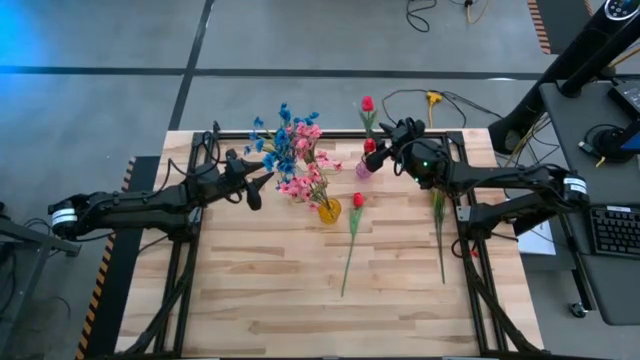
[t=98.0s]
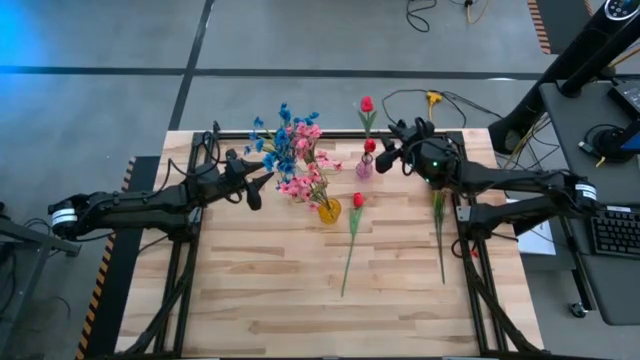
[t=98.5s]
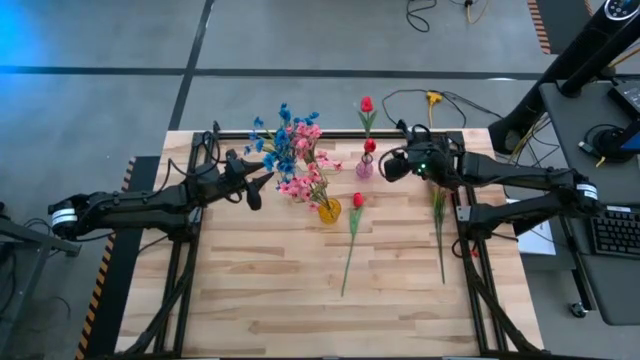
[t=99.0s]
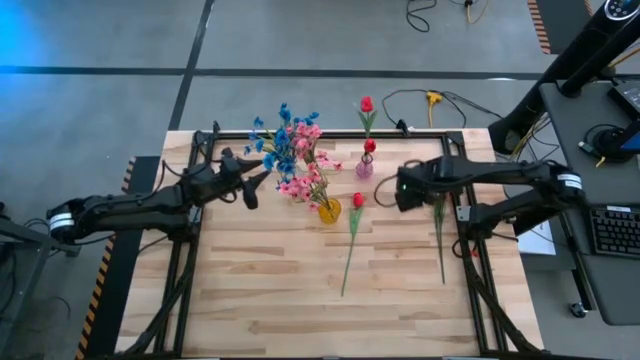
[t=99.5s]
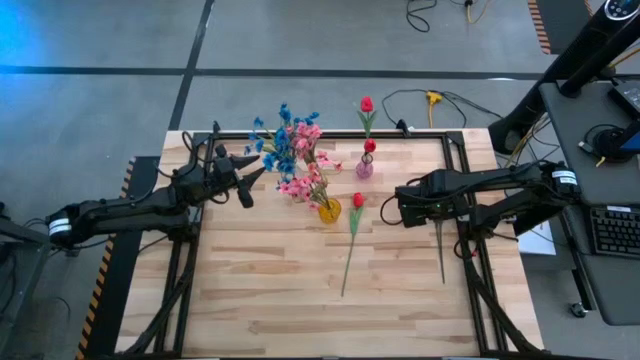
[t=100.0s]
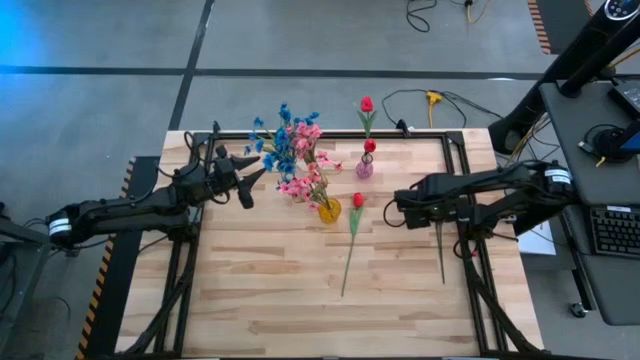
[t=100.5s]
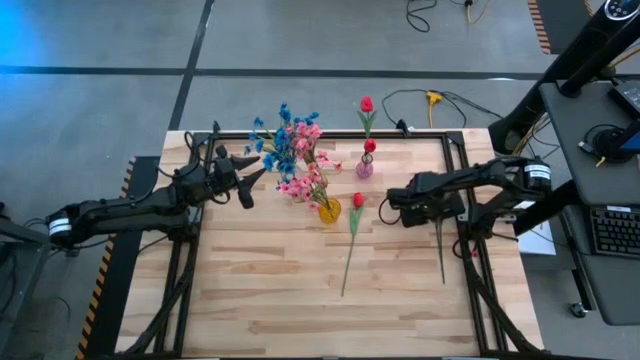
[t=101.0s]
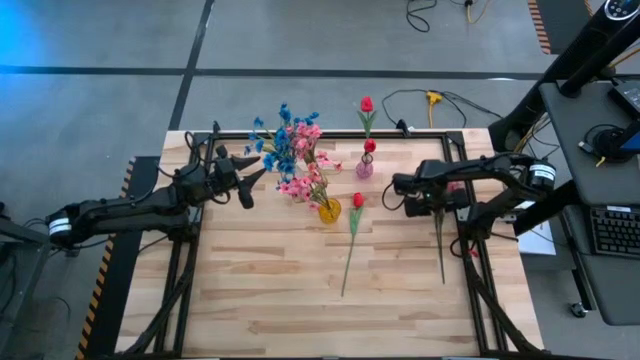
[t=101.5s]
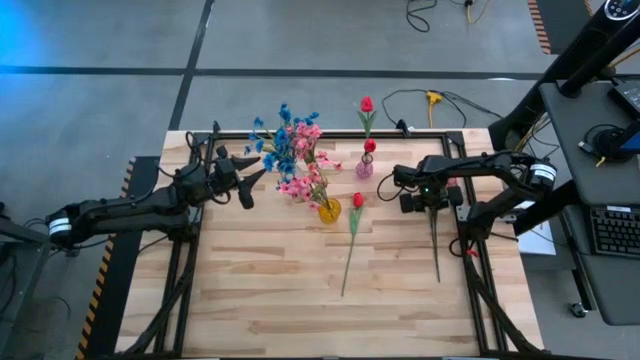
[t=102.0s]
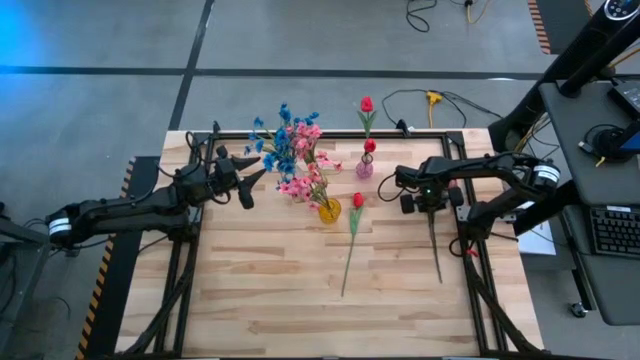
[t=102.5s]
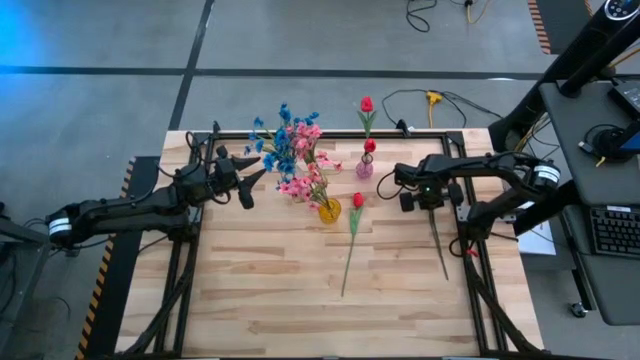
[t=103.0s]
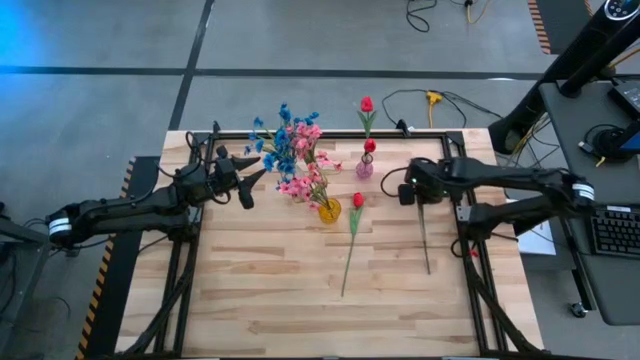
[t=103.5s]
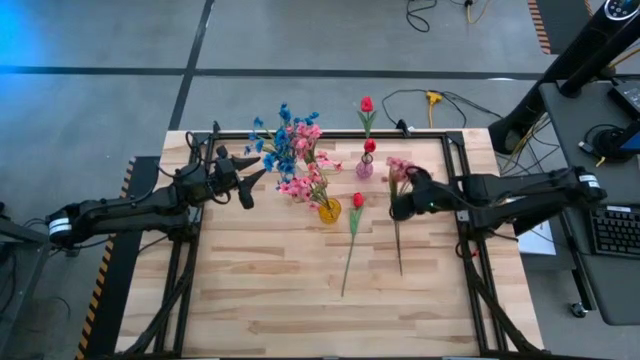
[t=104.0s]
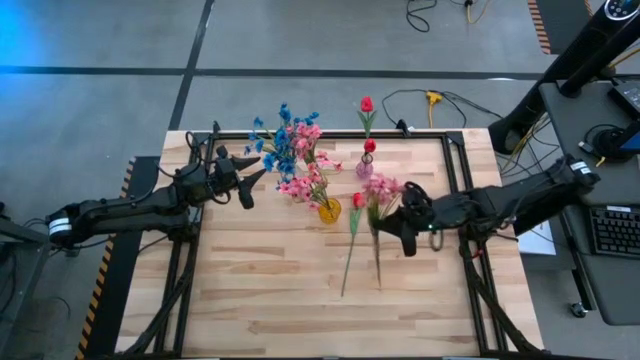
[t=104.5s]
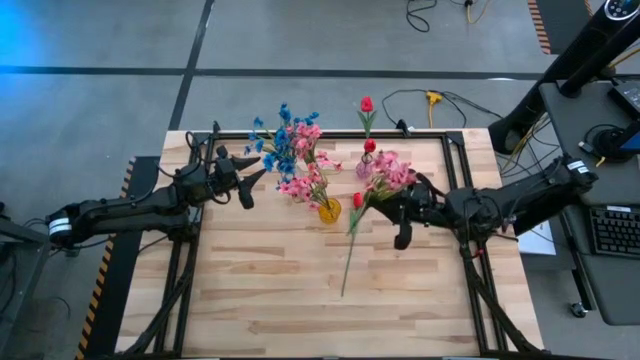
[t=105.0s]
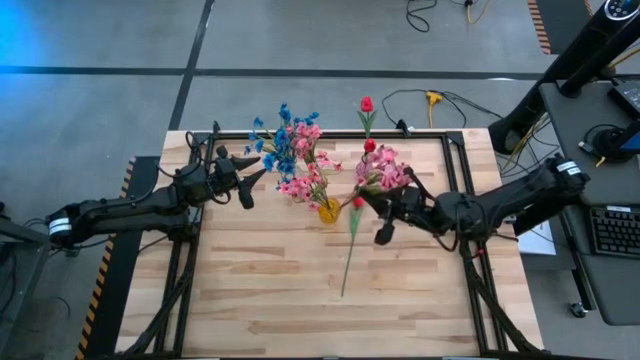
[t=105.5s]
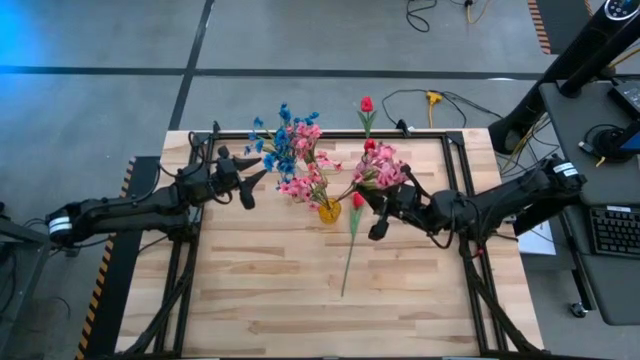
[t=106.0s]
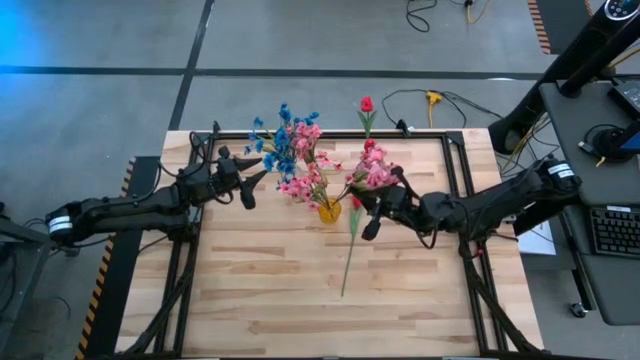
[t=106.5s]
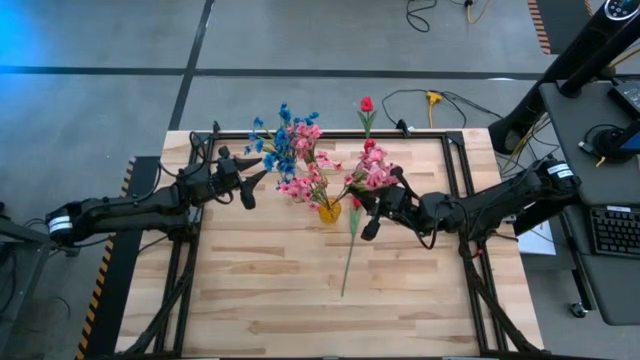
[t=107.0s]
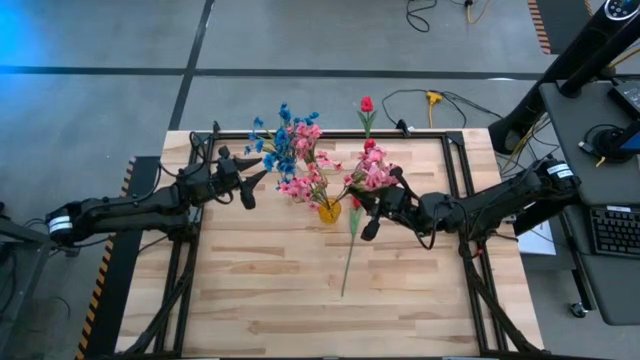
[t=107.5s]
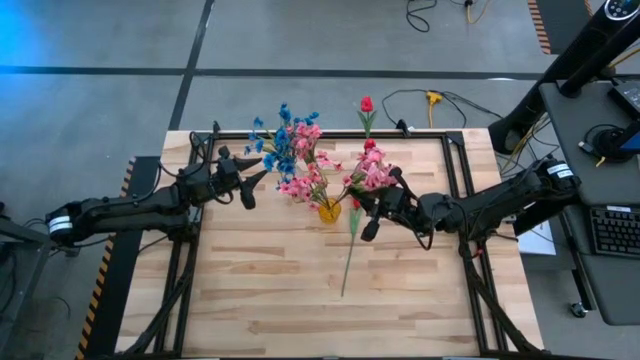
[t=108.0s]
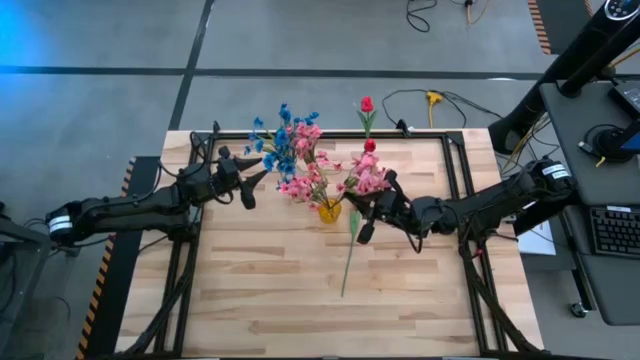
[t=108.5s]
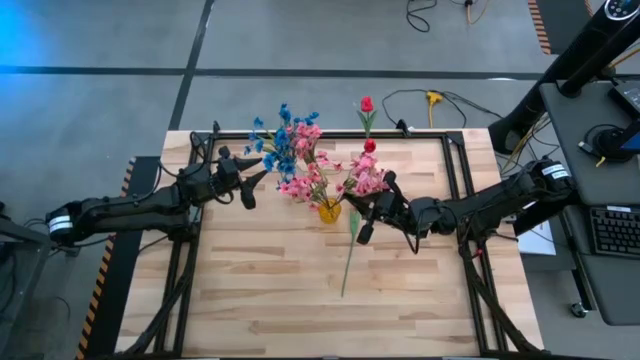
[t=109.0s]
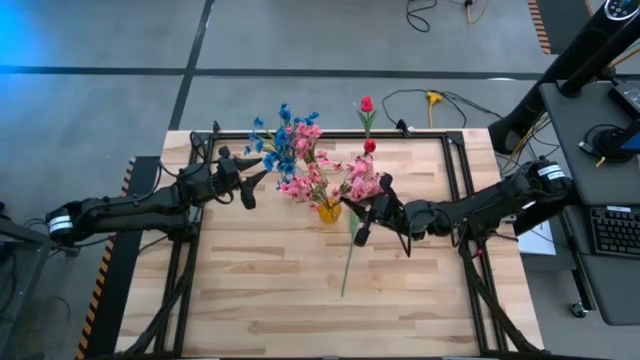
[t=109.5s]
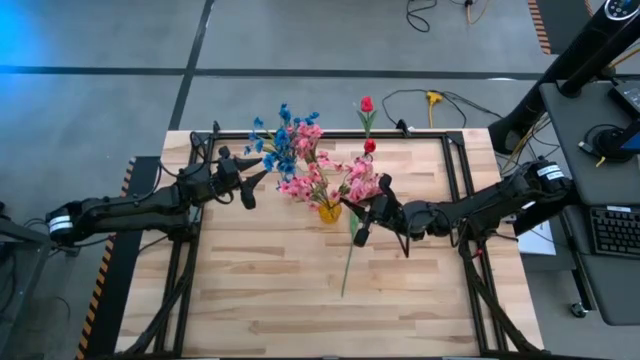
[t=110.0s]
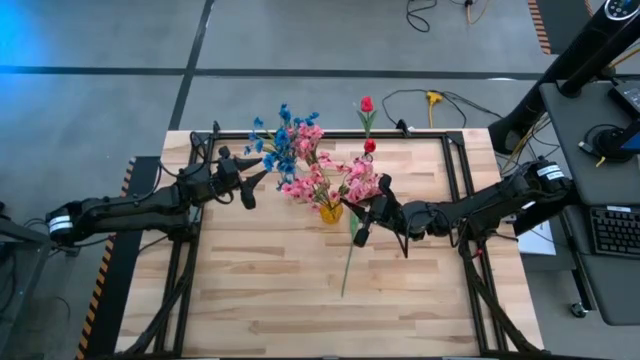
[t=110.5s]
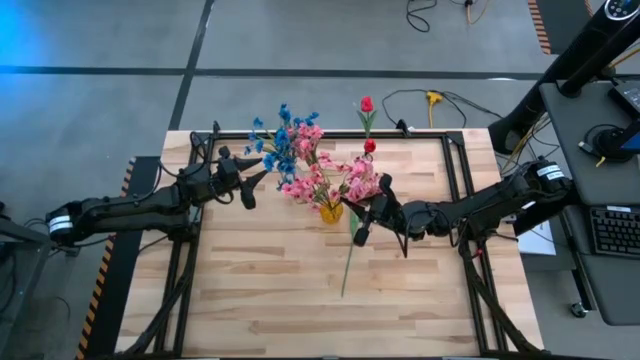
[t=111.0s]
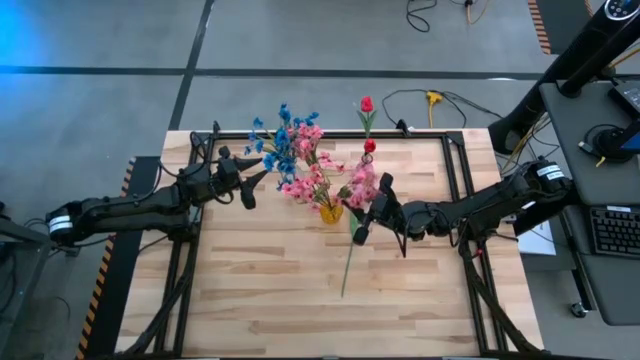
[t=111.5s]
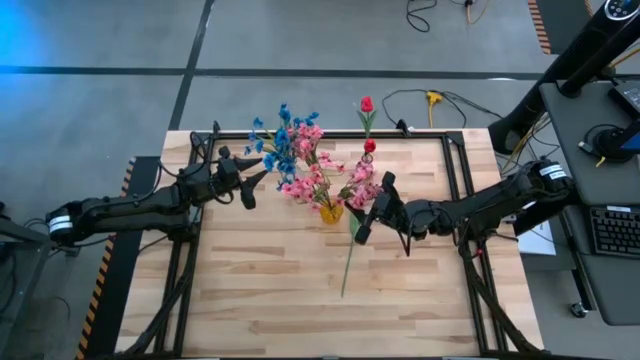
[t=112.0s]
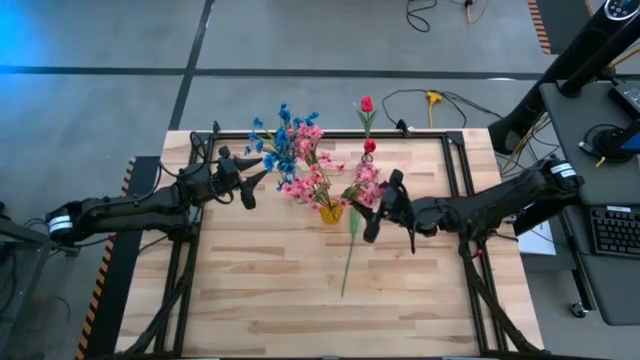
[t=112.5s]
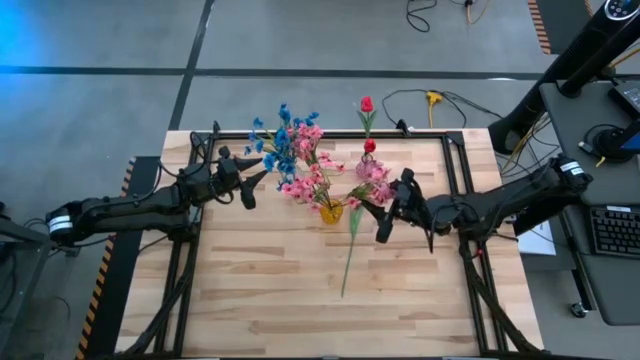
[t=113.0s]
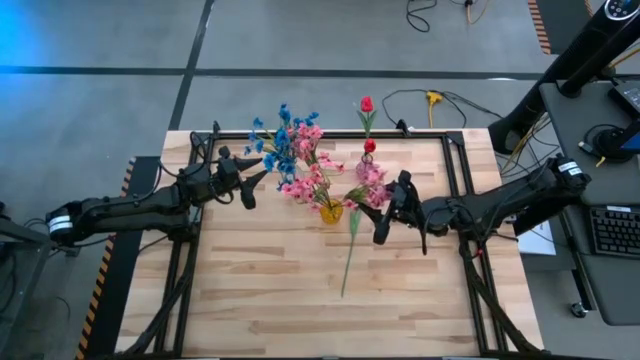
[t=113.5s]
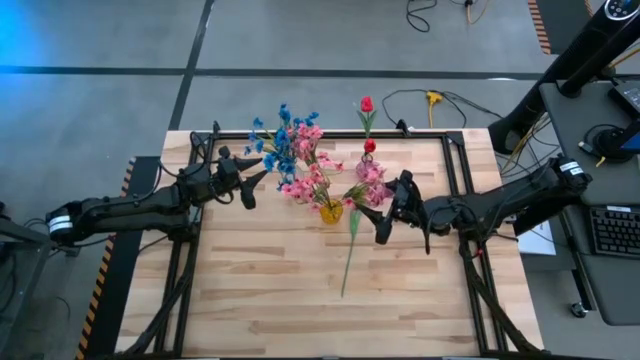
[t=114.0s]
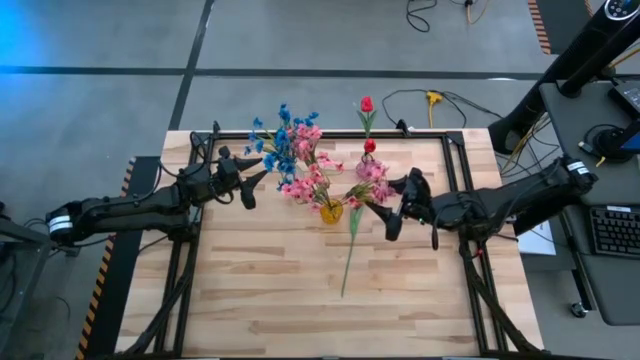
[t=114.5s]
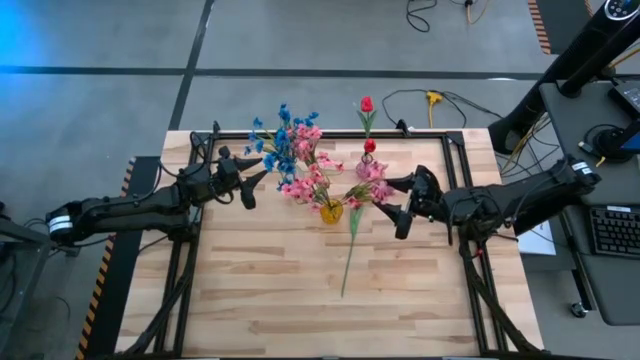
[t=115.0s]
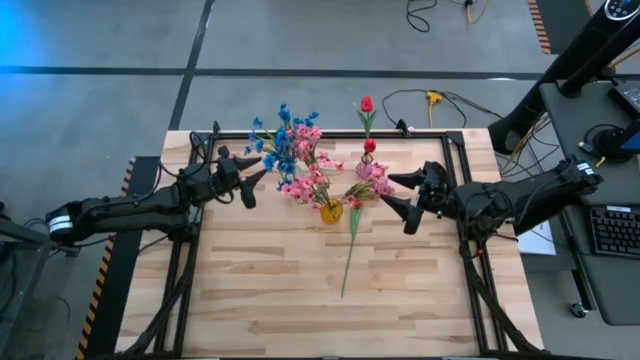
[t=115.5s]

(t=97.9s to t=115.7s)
Task: Sort flowers into vase by color
Put the pink flowers into the yellow vase

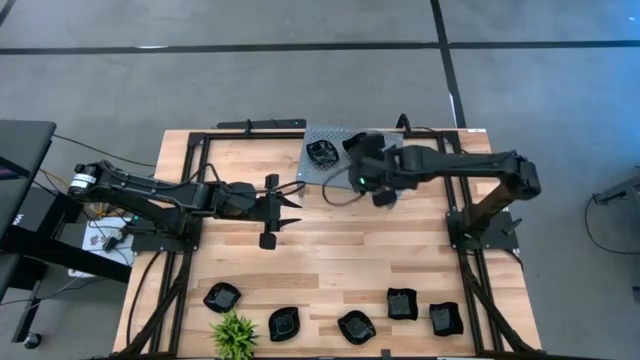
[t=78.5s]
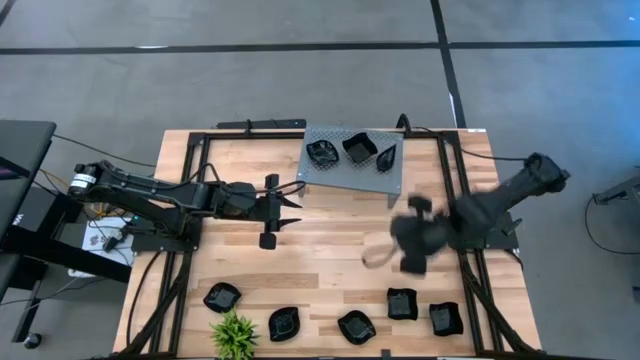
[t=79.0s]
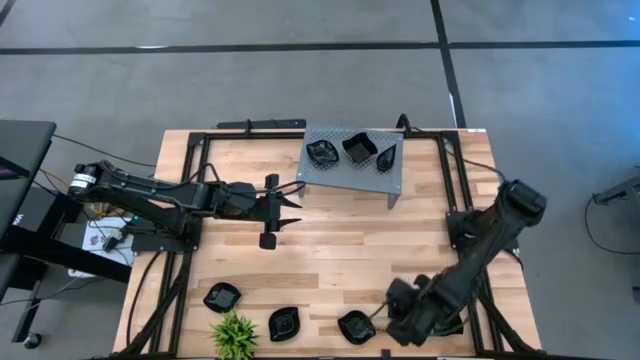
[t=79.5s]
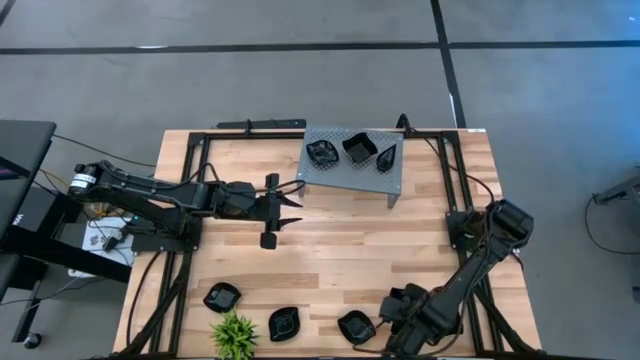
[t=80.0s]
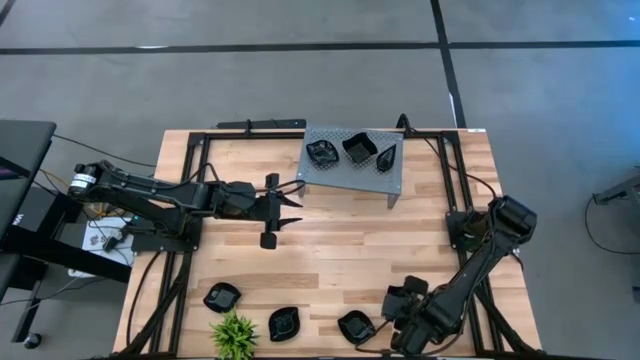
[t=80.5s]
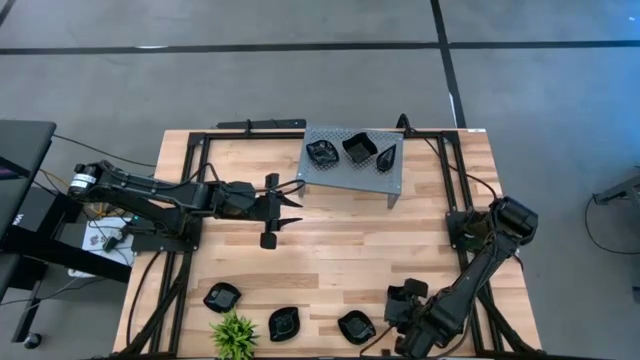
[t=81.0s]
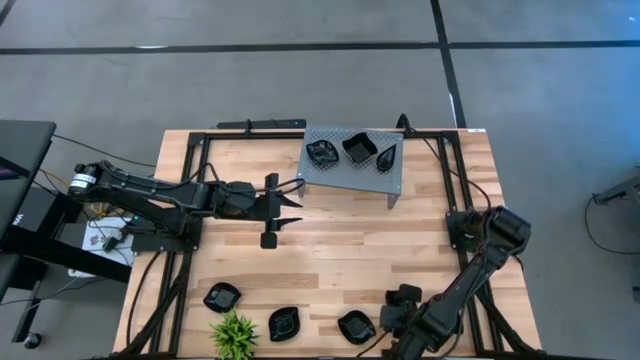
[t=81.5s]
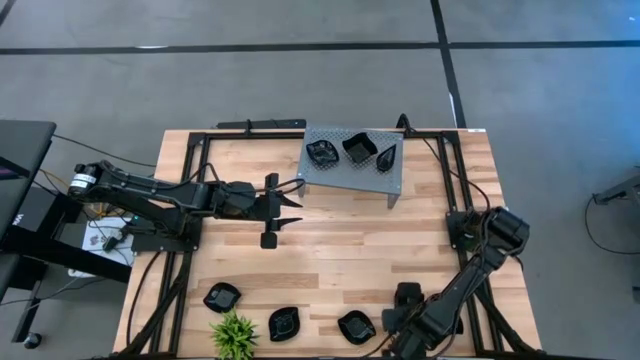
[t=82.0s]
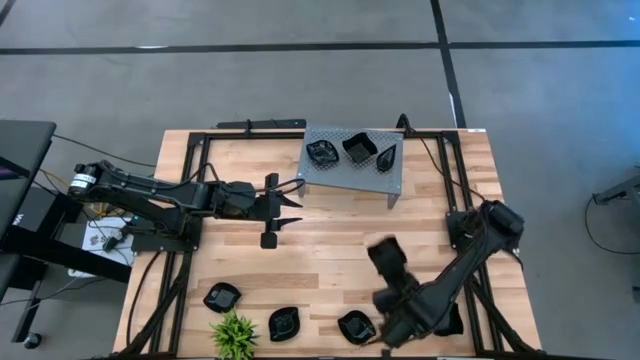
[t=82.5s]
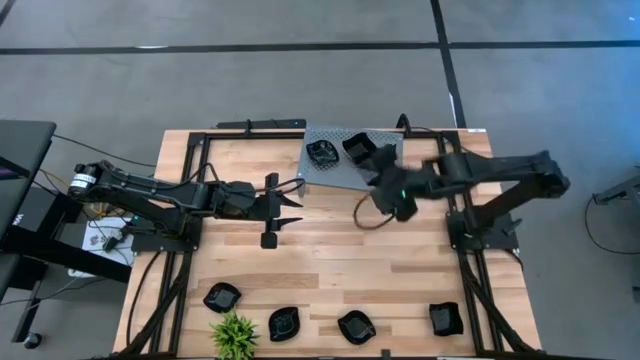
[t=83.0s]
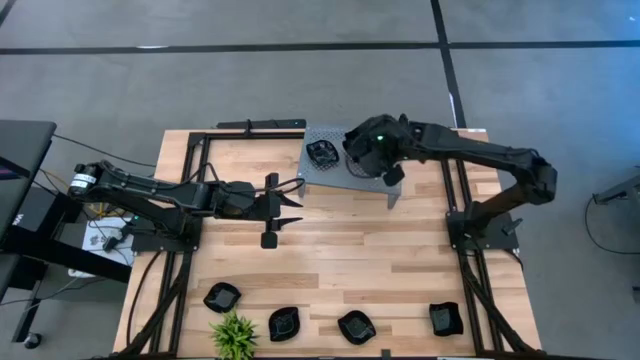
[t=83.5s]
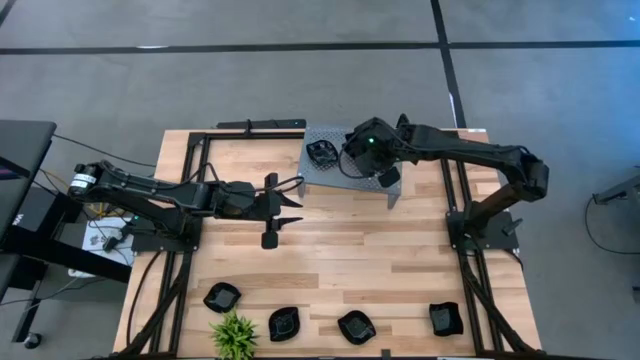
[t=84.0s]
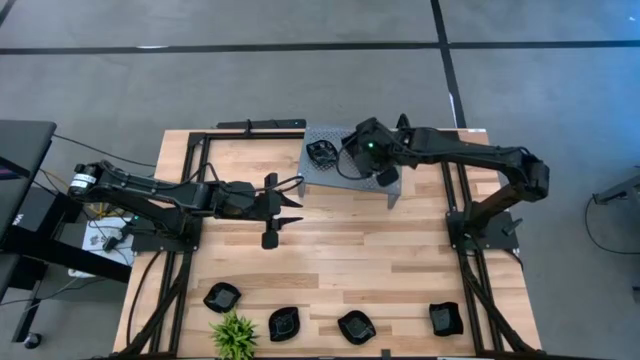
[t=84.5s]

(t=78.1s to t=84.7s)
Task: Pick & Place Mini shaped plates
Stack the distorted square plate on the other distorted square plates on the shelf
